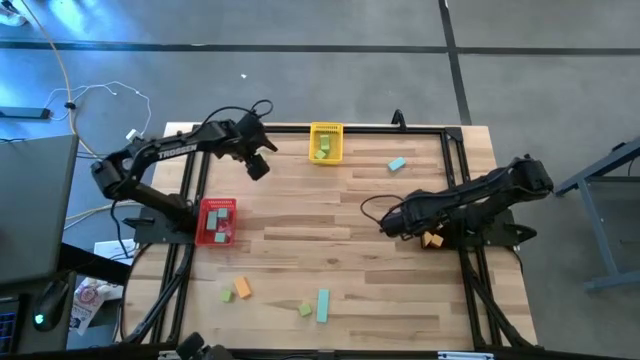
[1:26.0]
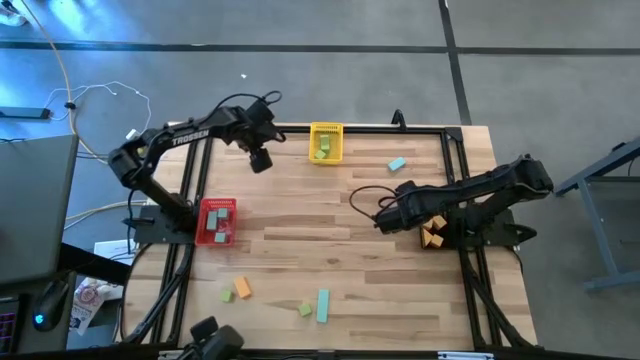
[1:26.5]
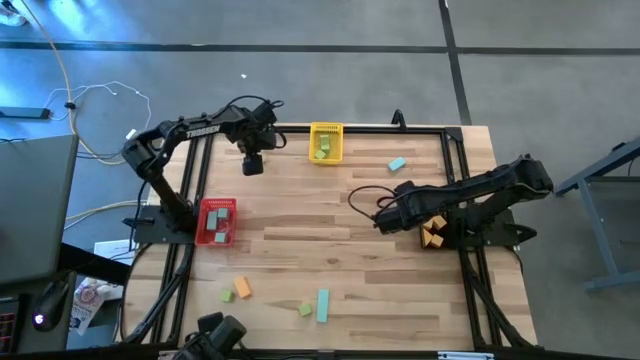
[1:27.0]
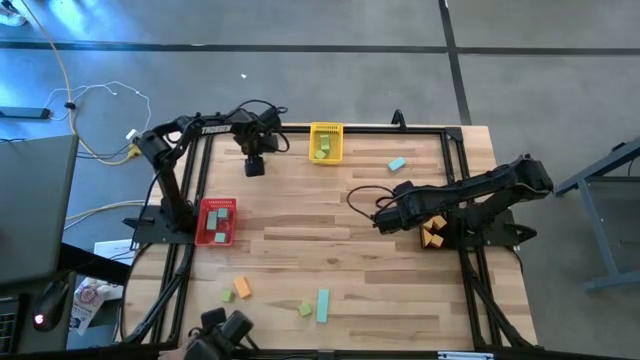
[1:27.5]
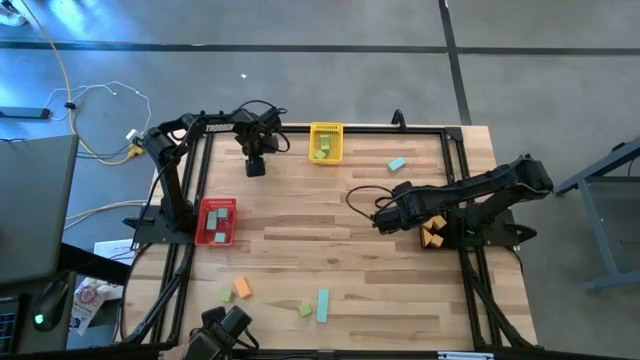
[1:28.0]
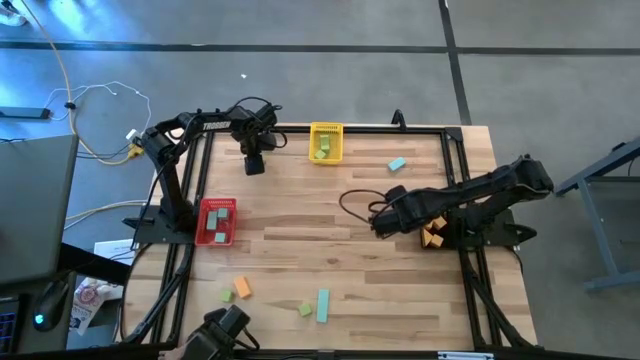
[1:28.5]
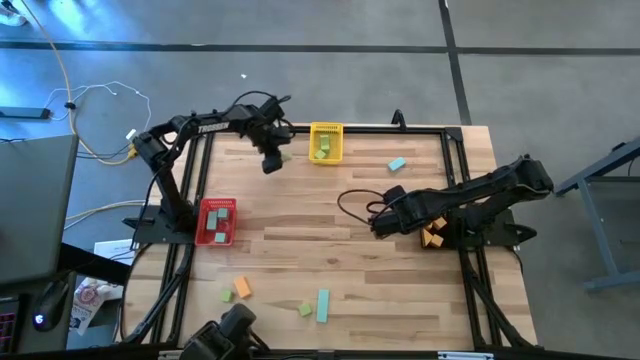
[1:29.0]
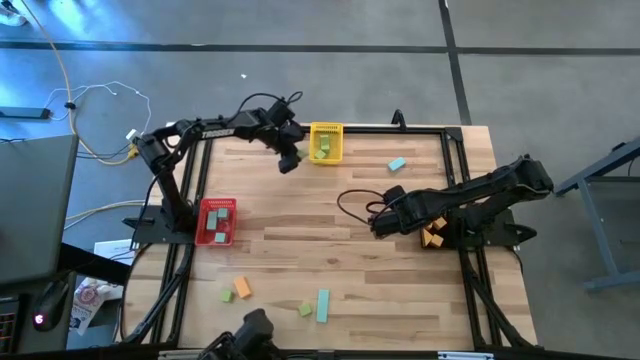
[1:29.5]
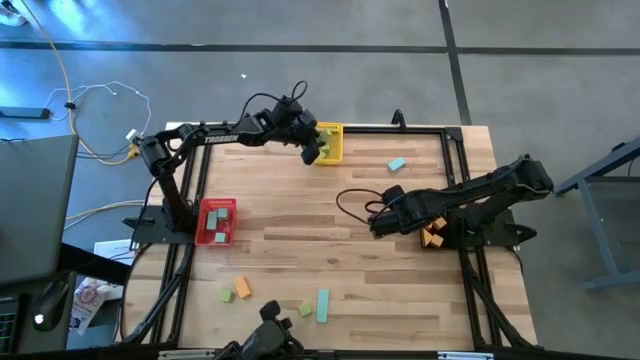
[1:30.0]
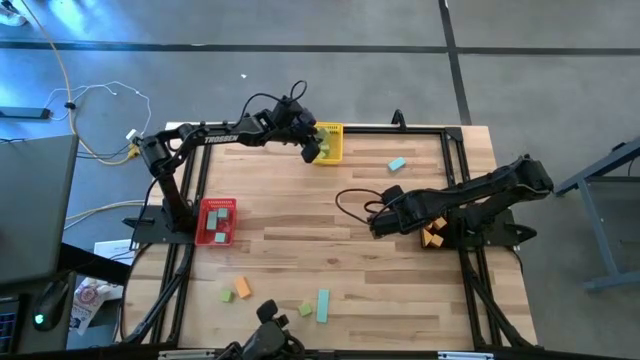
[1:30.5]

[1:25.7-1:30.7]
Task: Sort & place blocks by color
Put the green block into the yellow bin

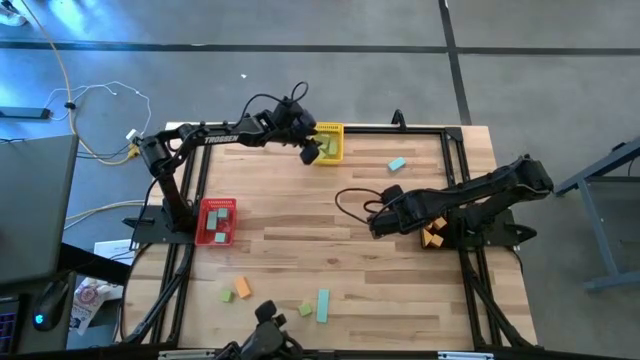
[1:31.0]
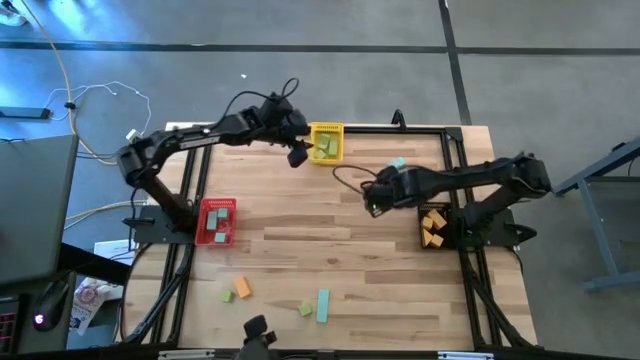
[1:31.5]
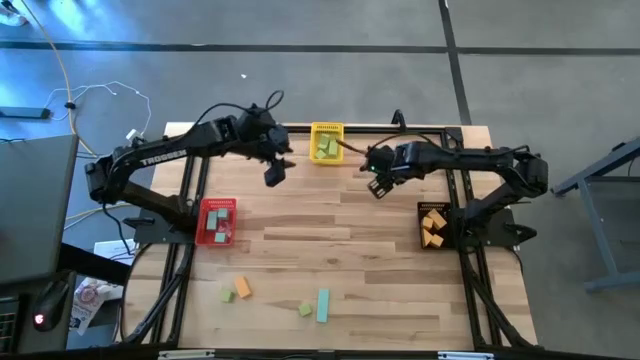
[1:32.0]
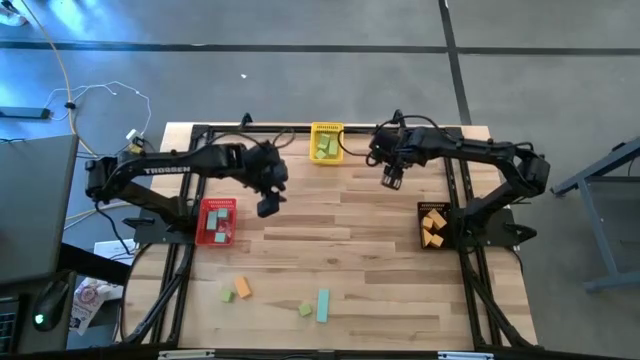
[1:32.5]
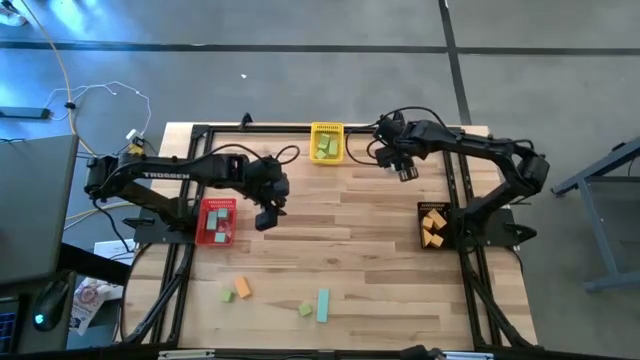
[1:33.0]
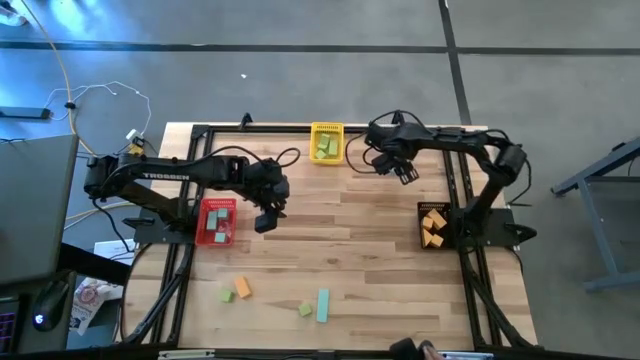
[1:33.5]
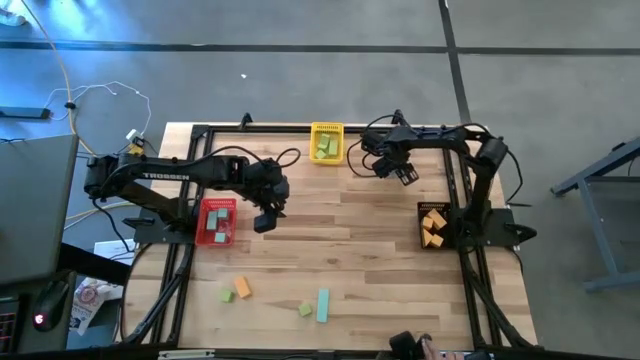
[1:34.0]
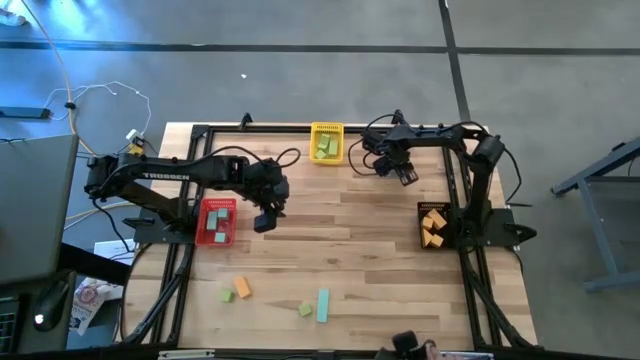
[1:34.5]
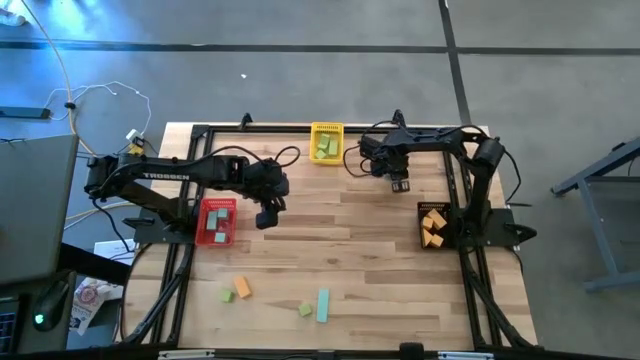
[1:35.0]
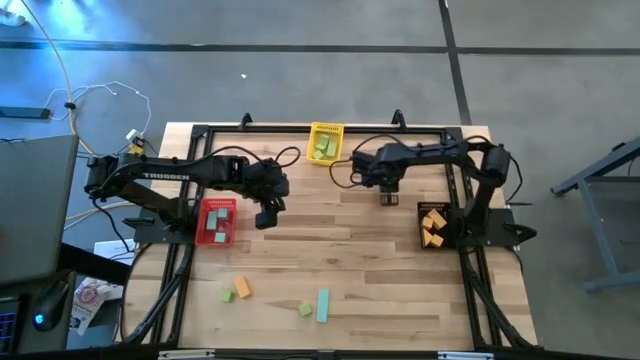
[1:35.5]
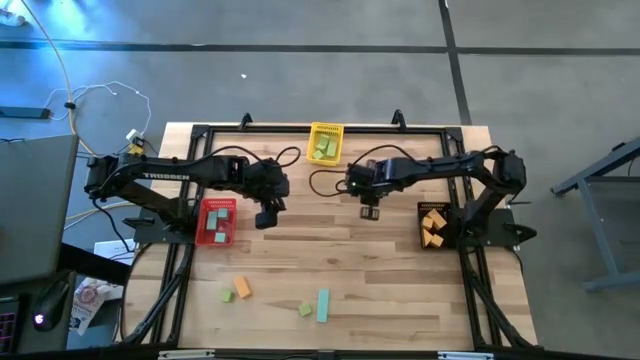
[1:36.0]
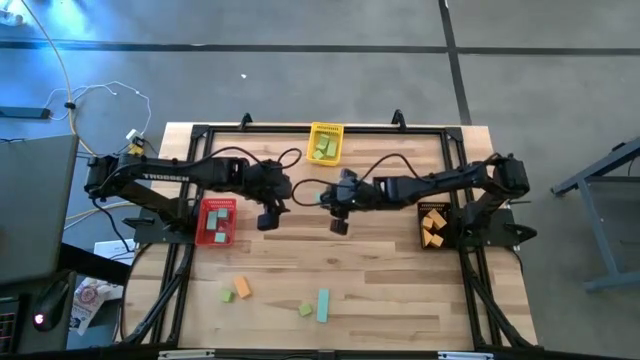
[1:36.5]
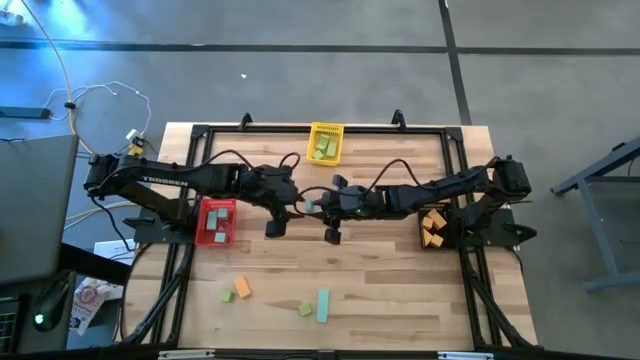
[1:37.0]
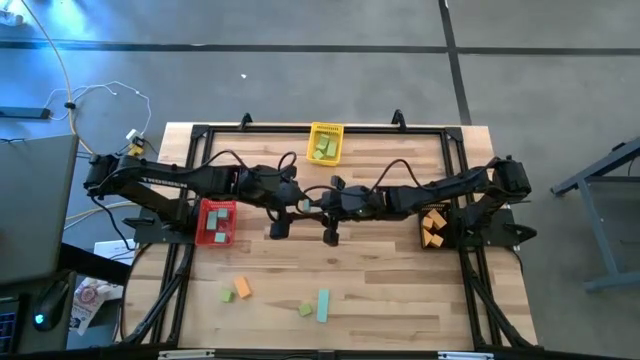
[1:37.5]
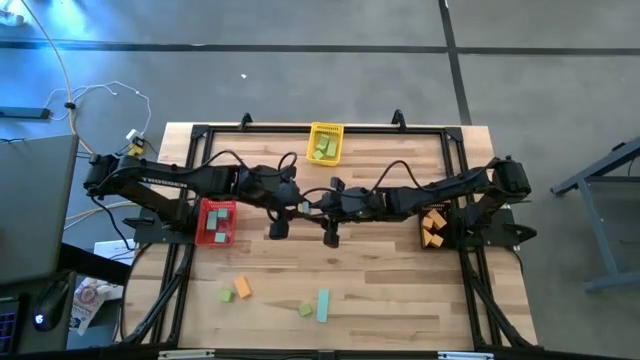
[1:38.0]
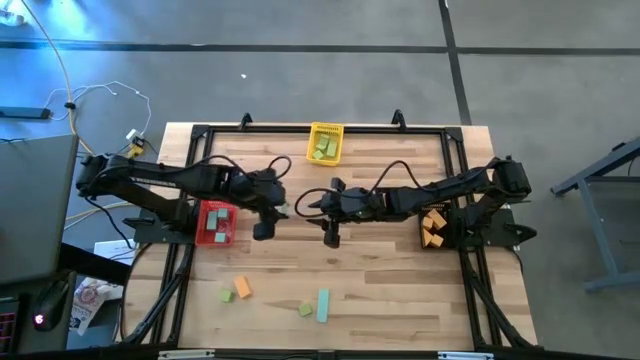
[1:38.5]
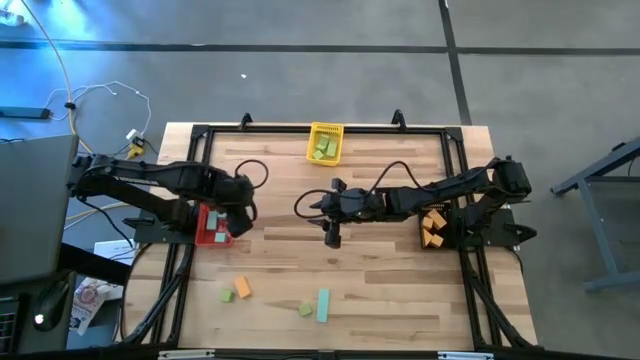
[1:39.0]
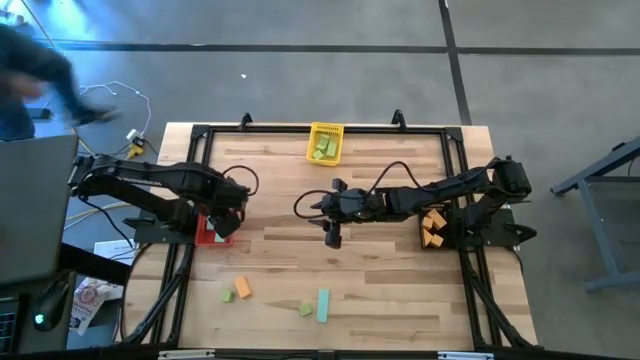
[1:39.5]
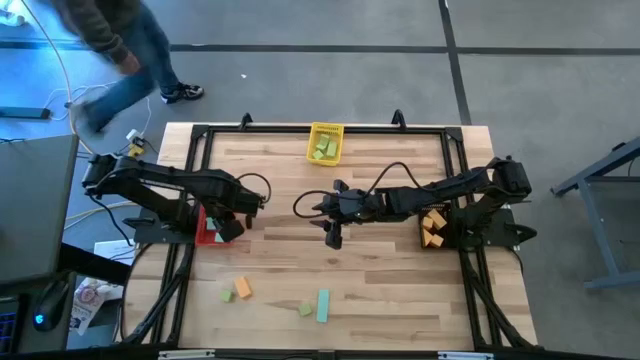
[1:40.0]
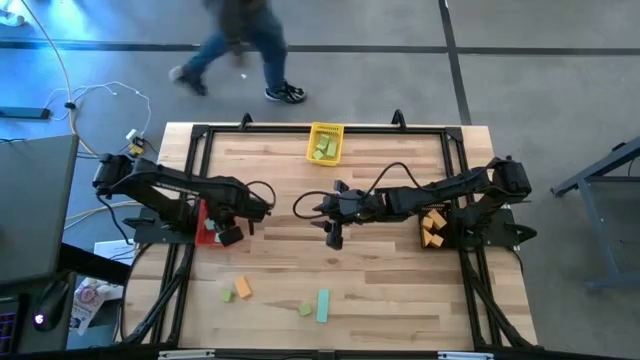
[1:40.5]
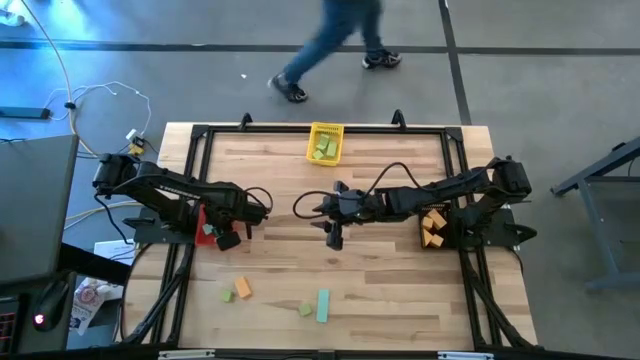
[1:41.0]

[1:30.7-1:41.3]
Put the blue block into the red bin

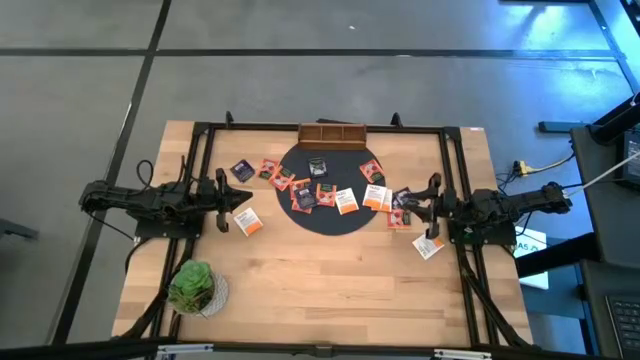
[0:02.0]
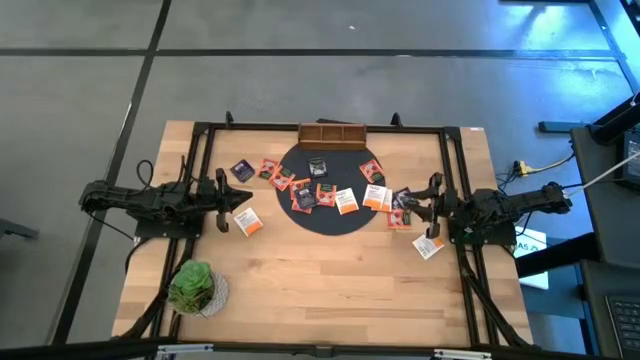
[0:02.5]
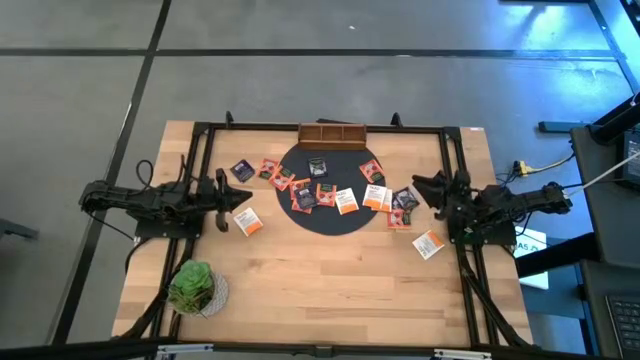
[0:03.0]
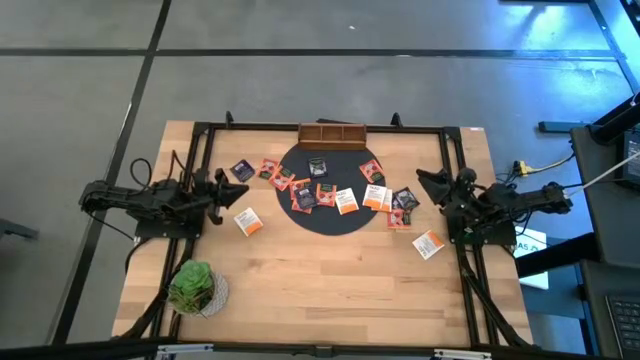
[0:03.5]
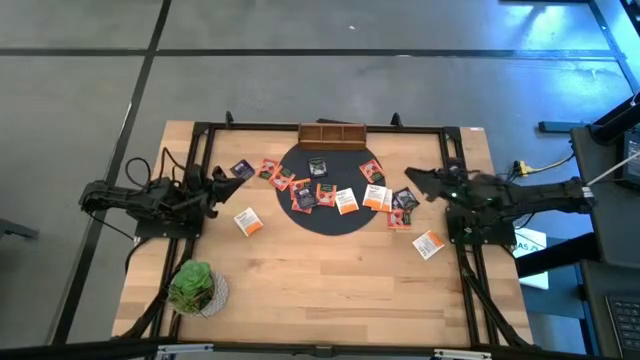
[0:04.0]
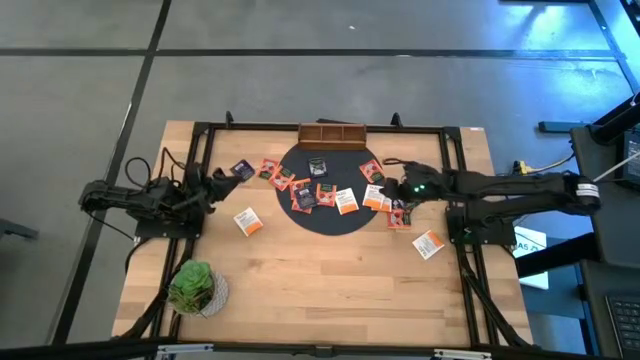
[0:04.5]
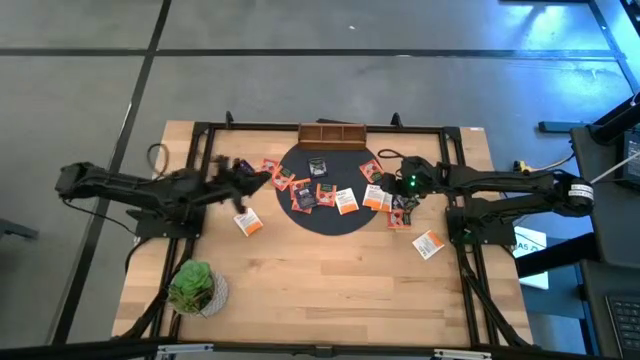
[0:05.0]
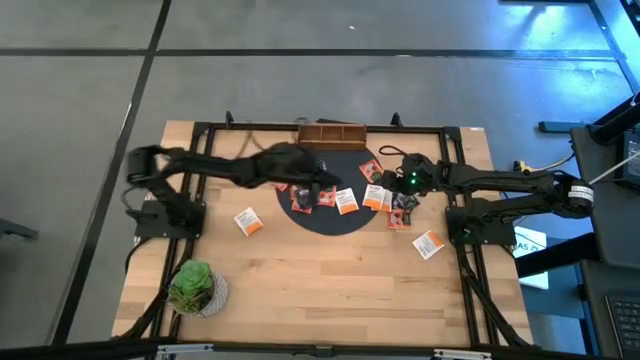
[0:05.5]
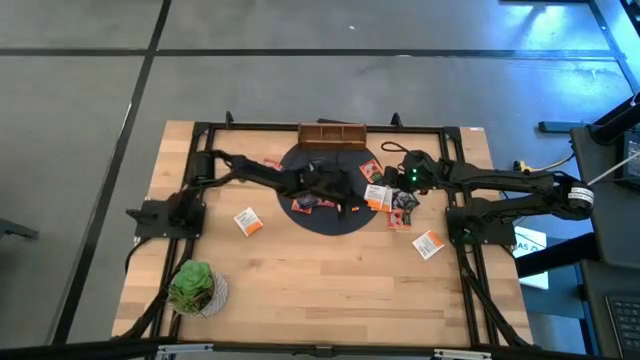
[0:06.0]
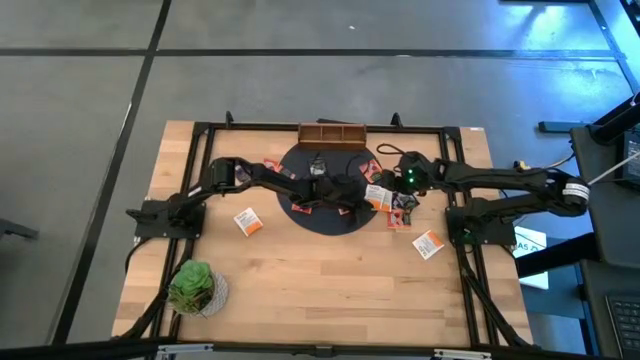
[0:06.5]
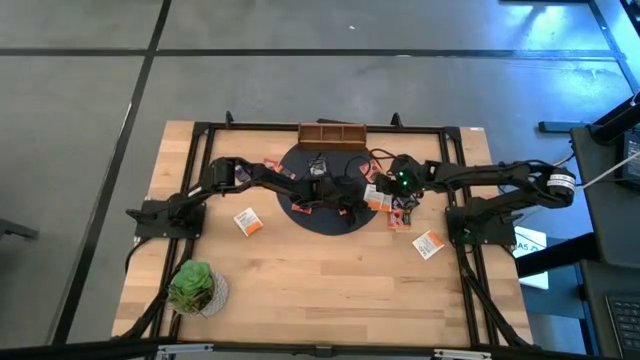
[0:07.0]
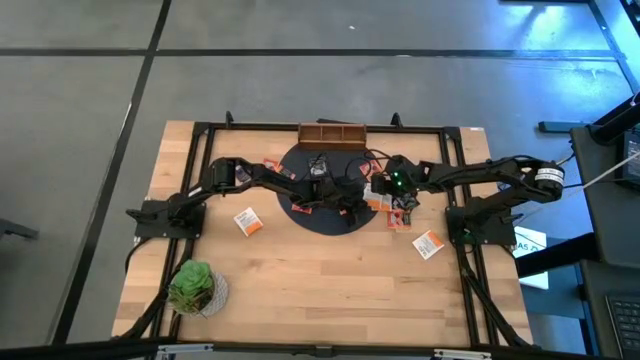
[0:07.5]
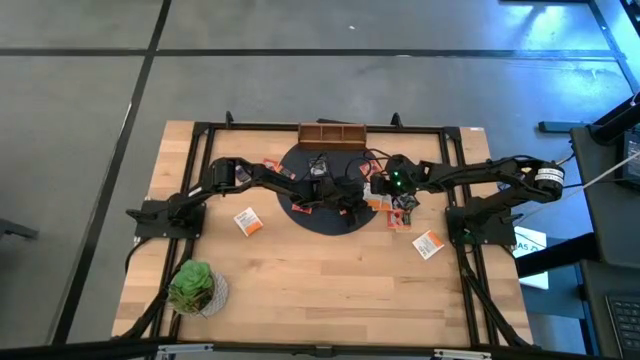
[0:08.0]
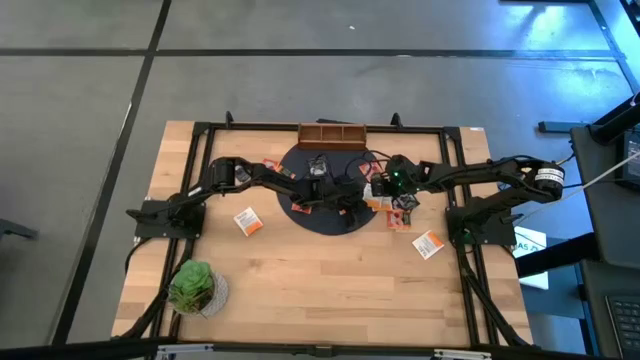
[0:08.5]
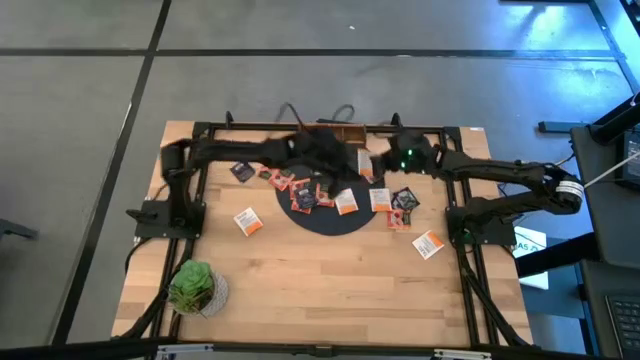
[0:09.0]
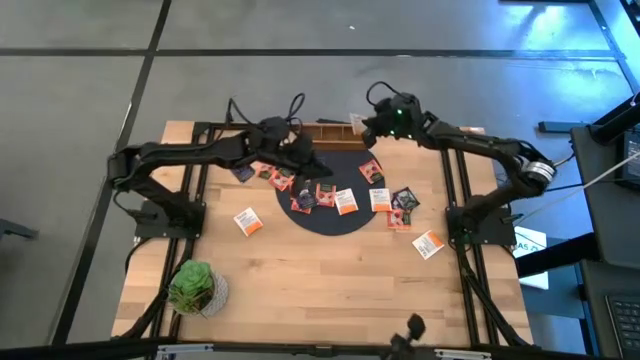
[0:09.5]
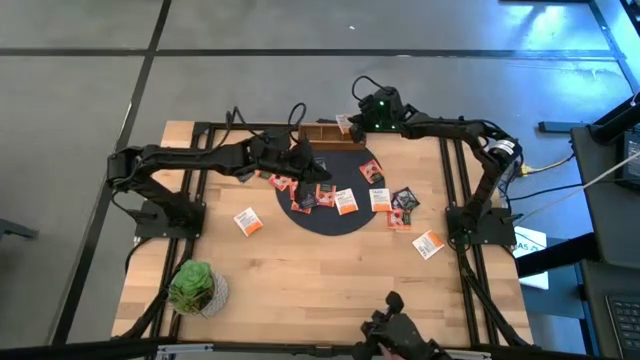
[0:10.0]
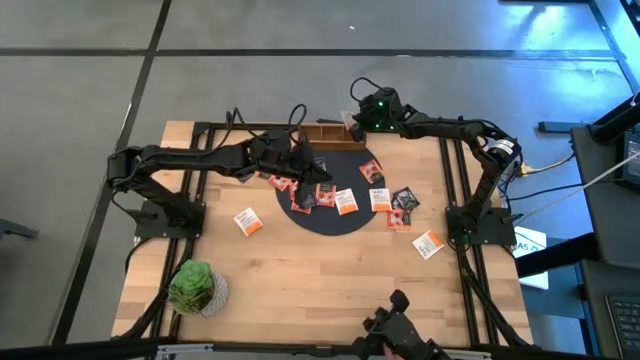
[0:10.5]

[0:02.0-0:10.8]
Task: Pick & Place Tea
Put the white tea bag into the right section of the wooden organizer
